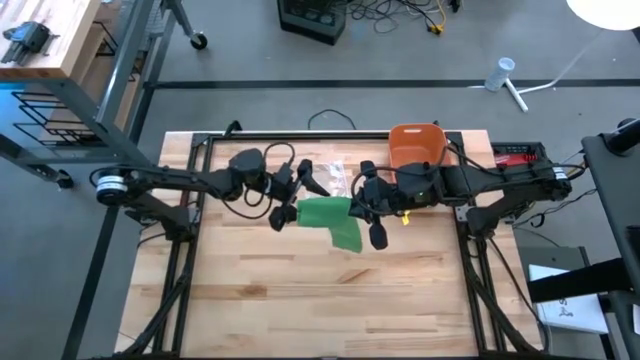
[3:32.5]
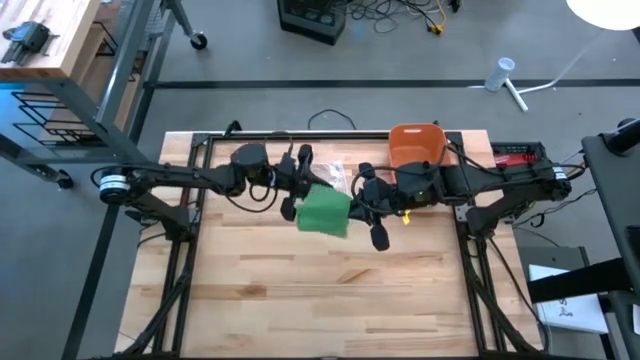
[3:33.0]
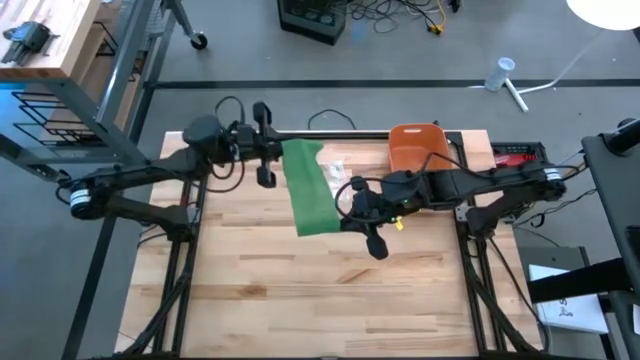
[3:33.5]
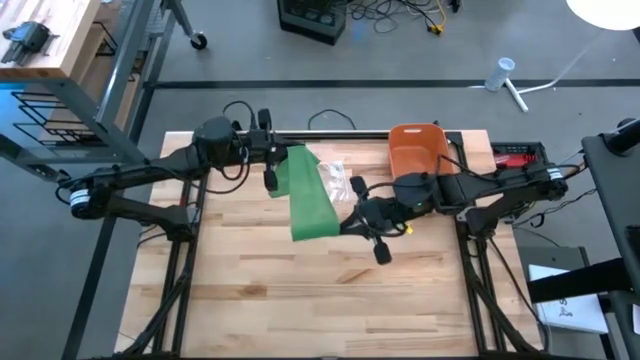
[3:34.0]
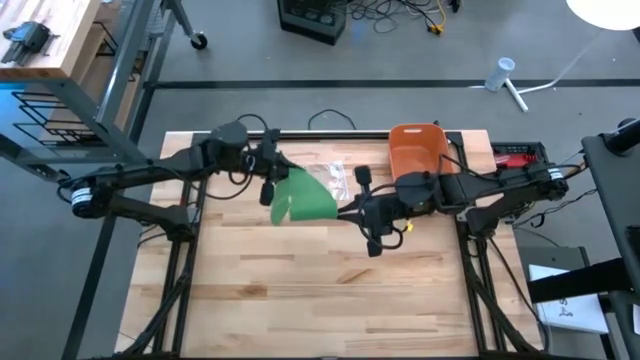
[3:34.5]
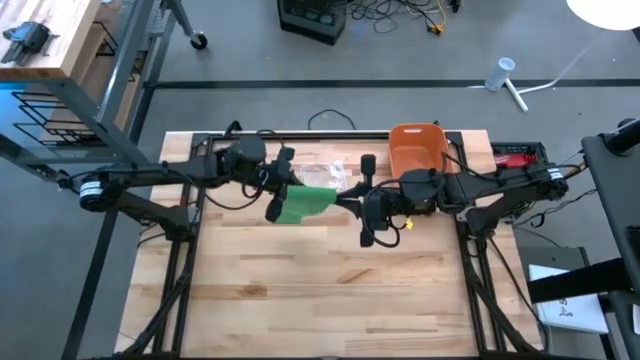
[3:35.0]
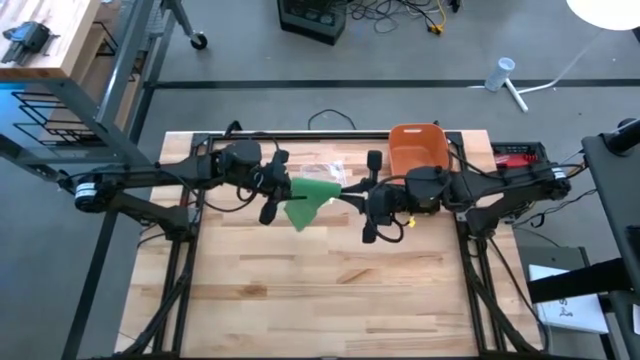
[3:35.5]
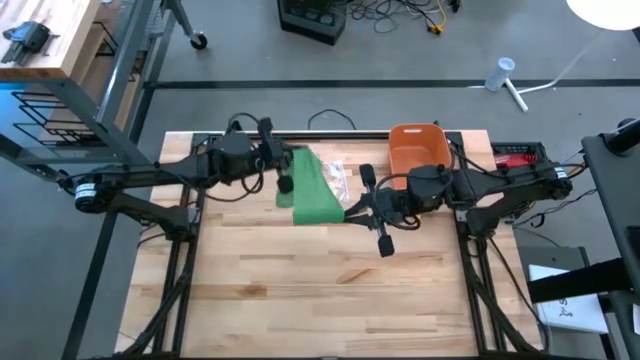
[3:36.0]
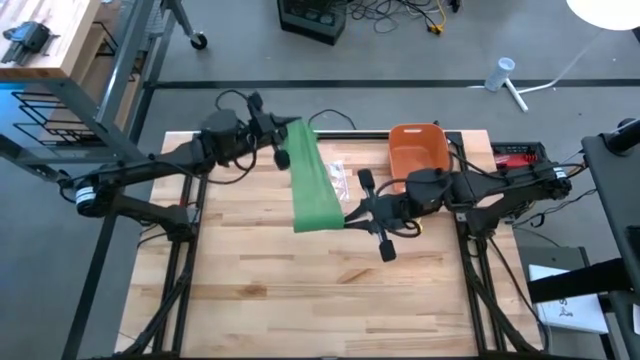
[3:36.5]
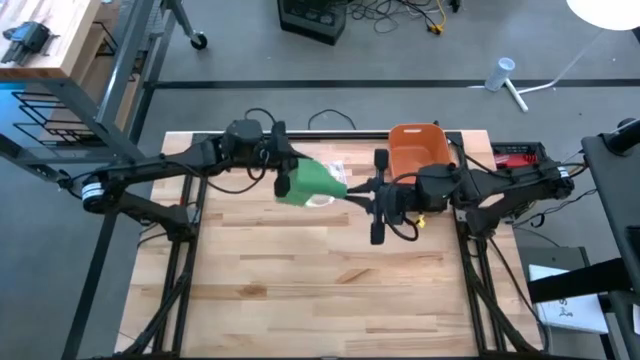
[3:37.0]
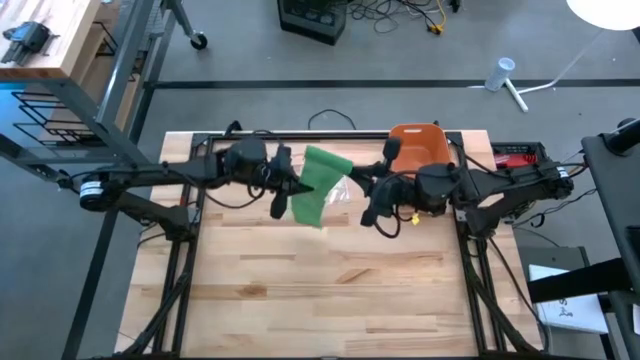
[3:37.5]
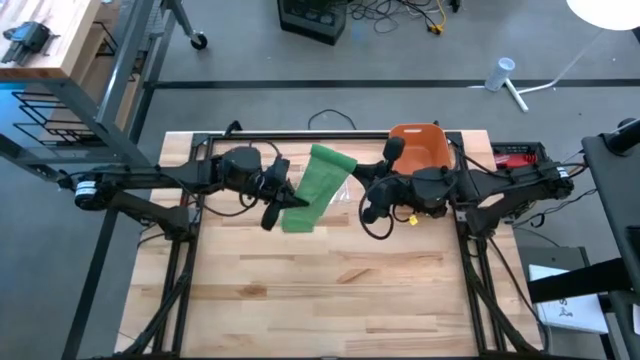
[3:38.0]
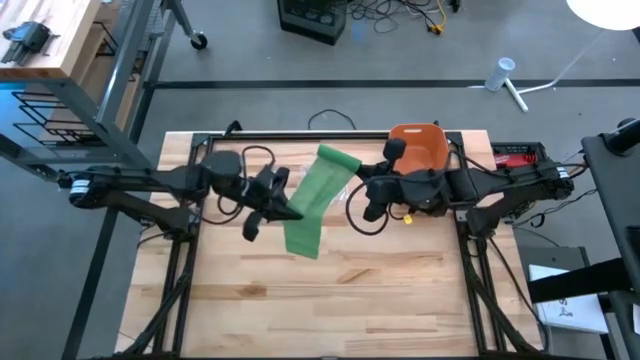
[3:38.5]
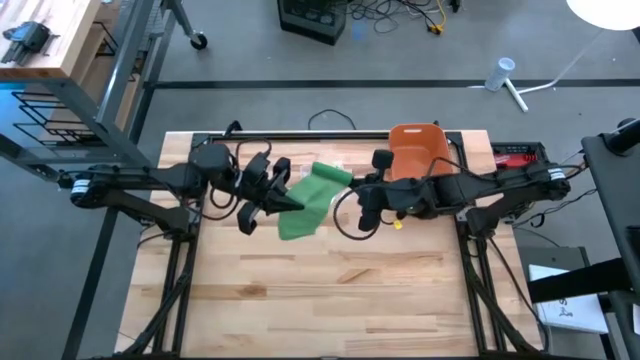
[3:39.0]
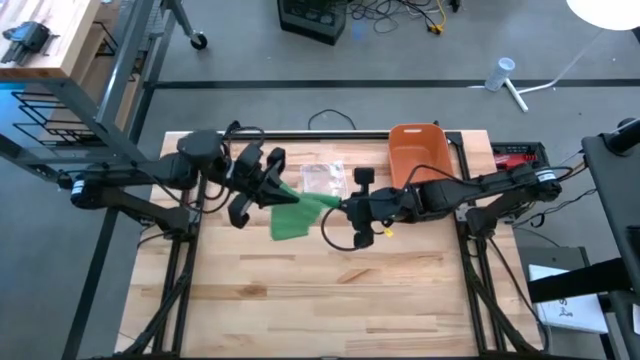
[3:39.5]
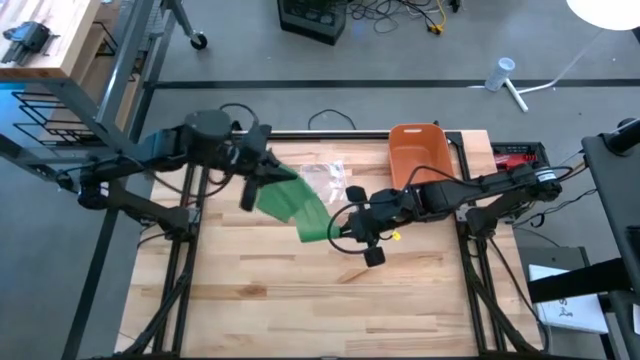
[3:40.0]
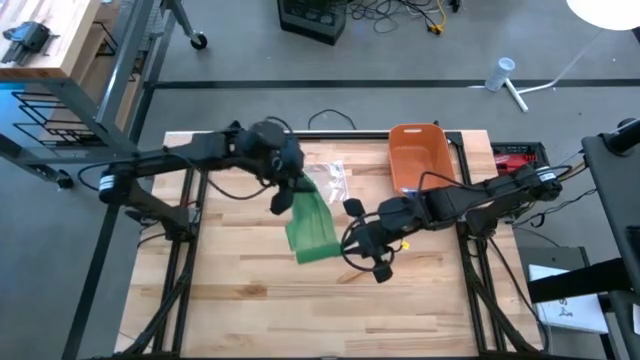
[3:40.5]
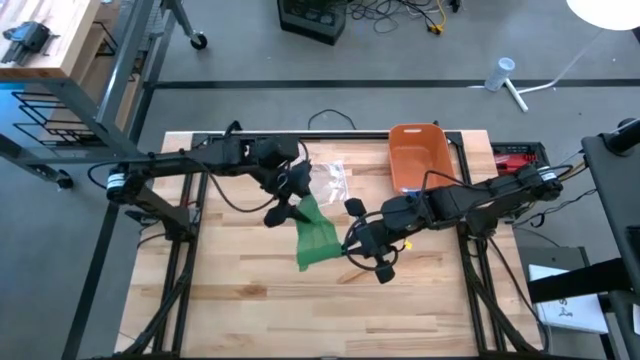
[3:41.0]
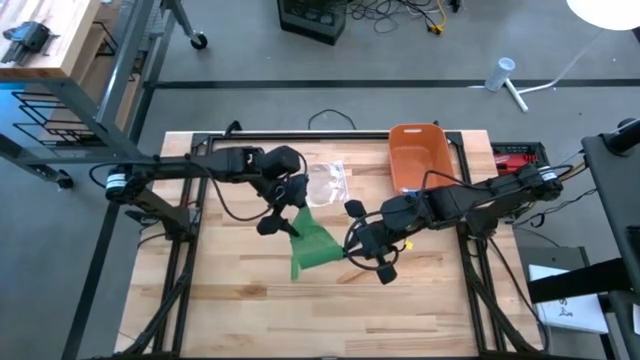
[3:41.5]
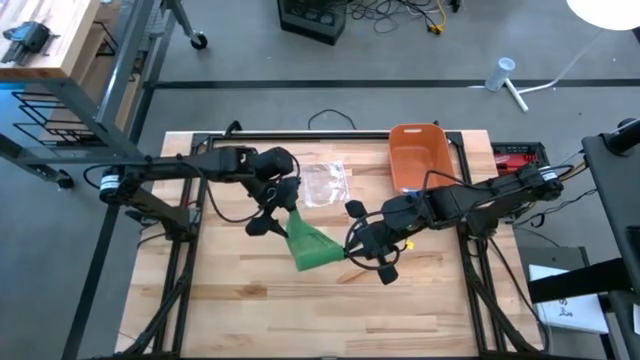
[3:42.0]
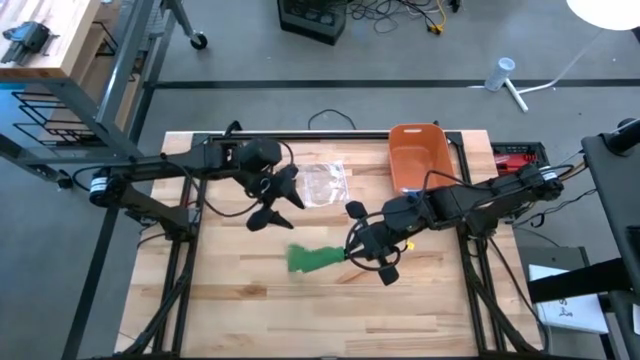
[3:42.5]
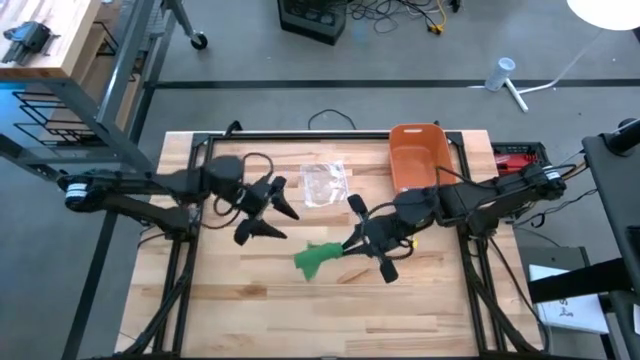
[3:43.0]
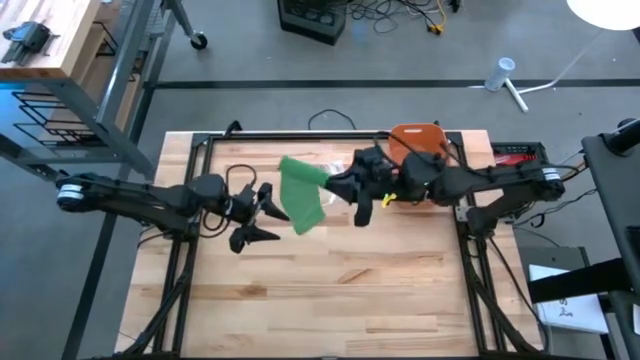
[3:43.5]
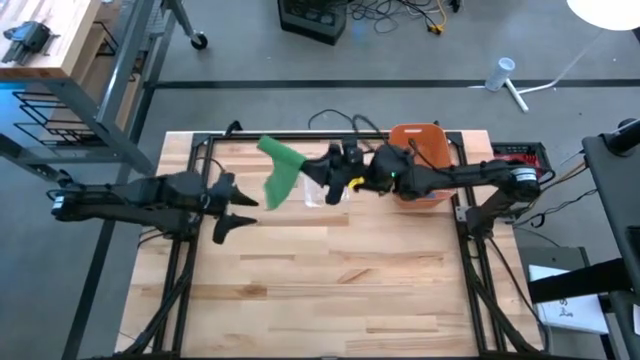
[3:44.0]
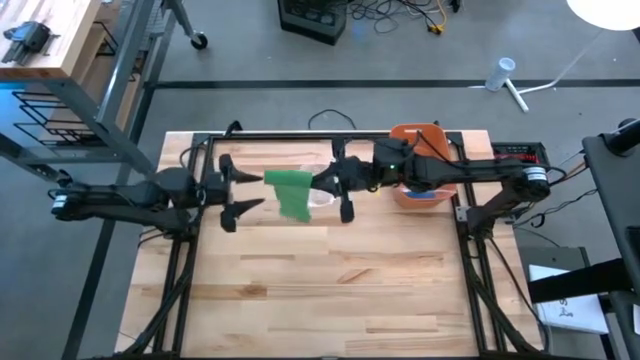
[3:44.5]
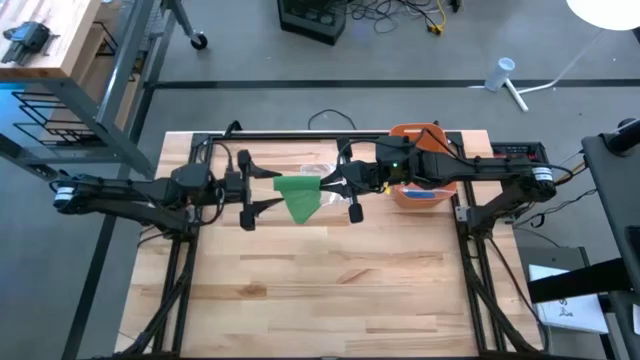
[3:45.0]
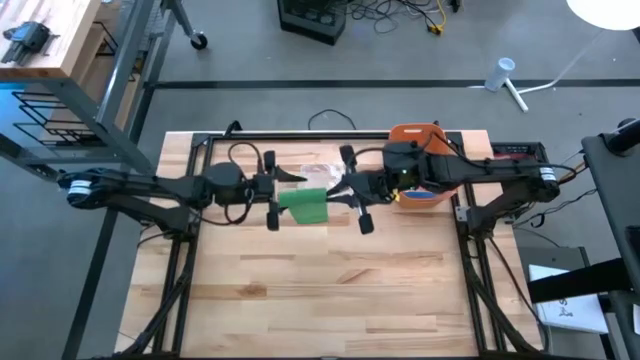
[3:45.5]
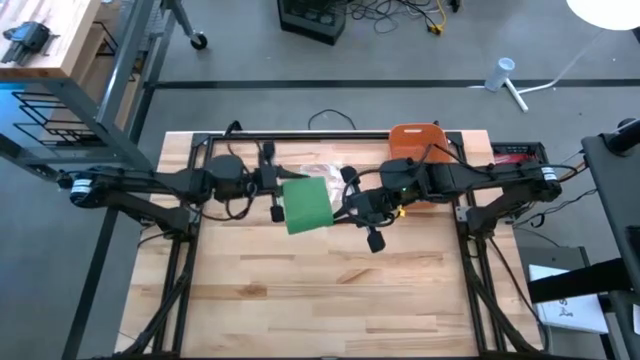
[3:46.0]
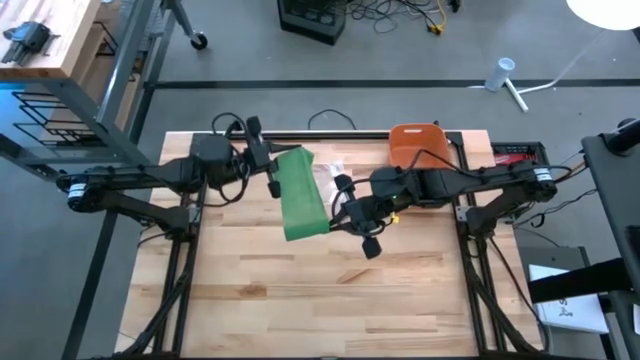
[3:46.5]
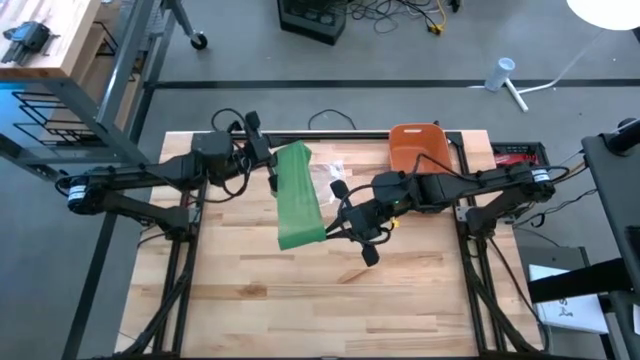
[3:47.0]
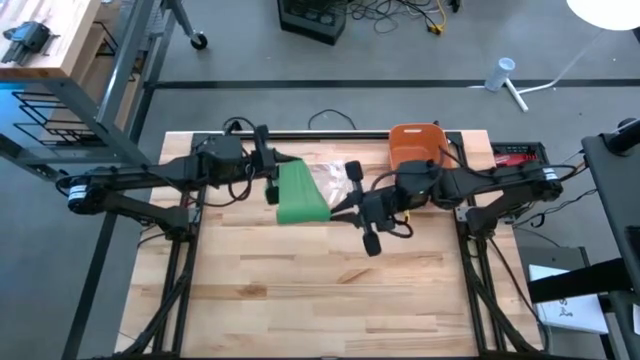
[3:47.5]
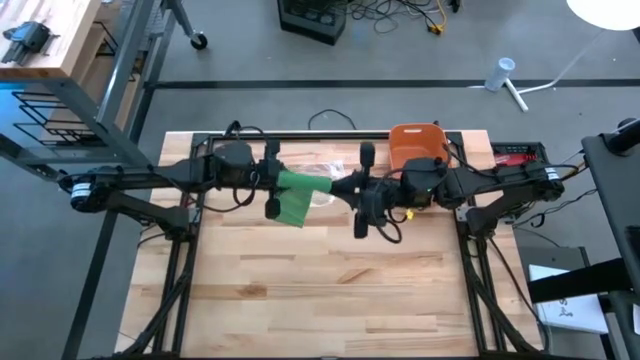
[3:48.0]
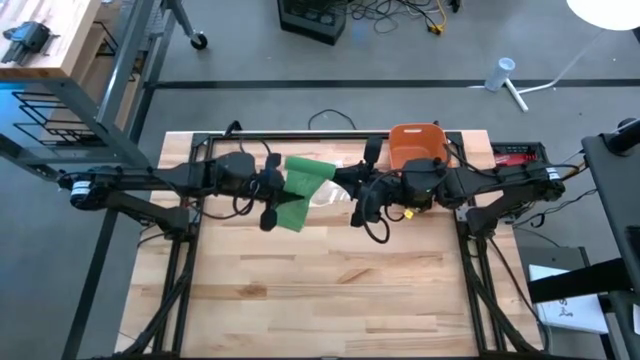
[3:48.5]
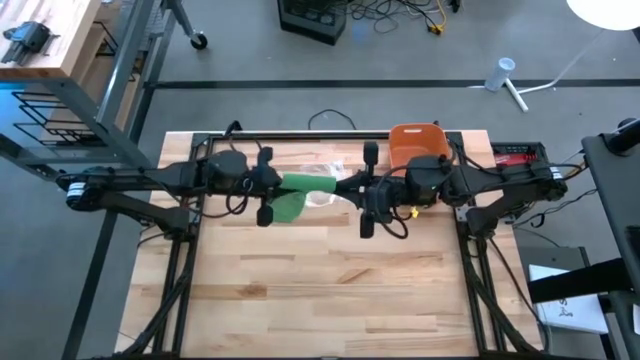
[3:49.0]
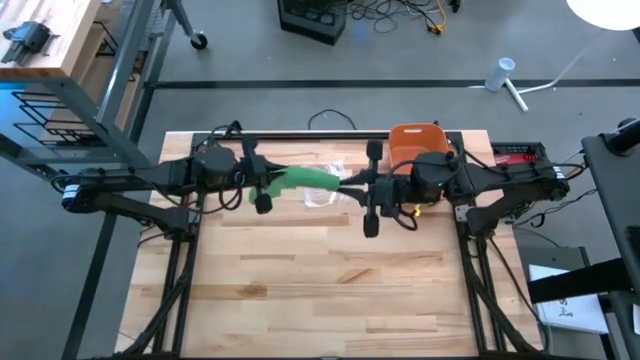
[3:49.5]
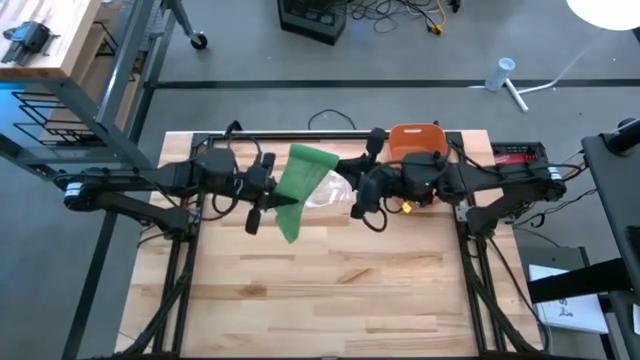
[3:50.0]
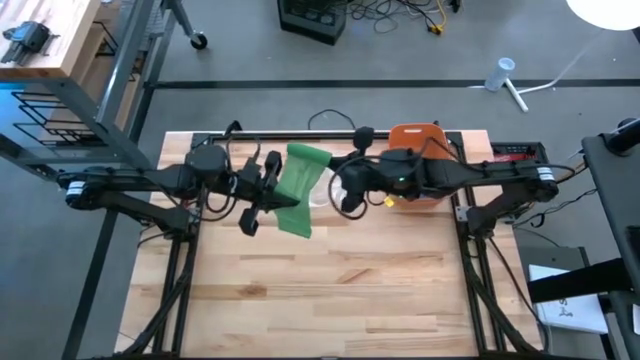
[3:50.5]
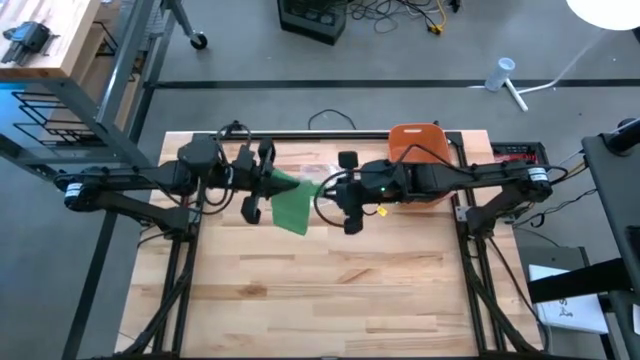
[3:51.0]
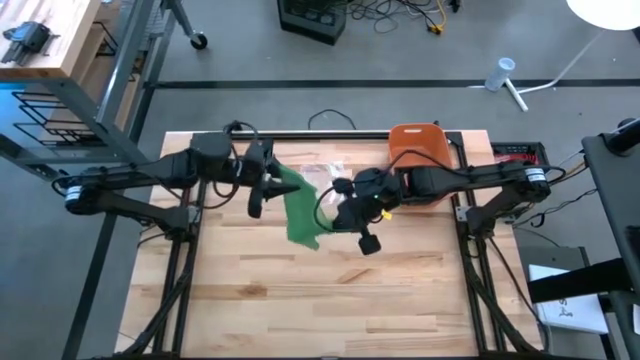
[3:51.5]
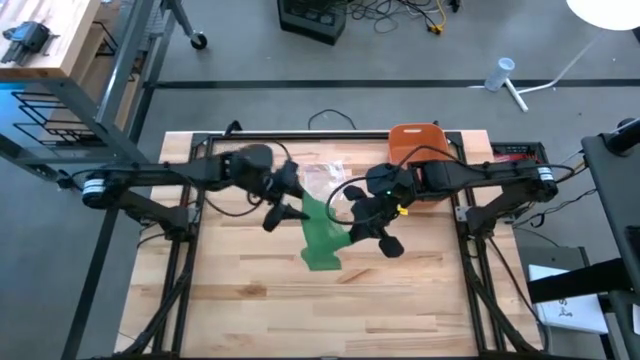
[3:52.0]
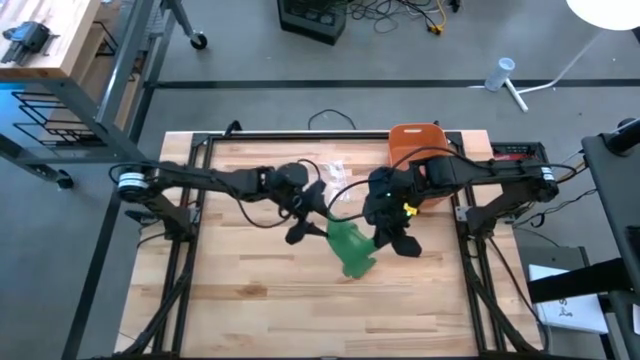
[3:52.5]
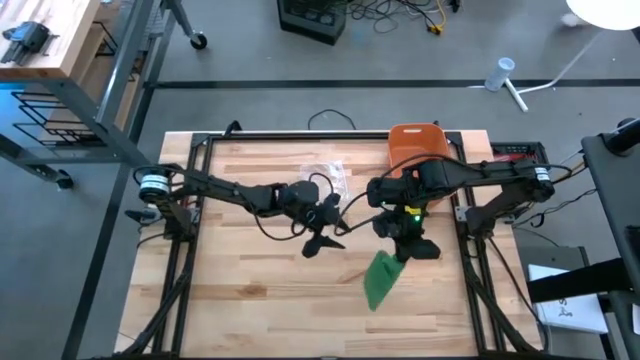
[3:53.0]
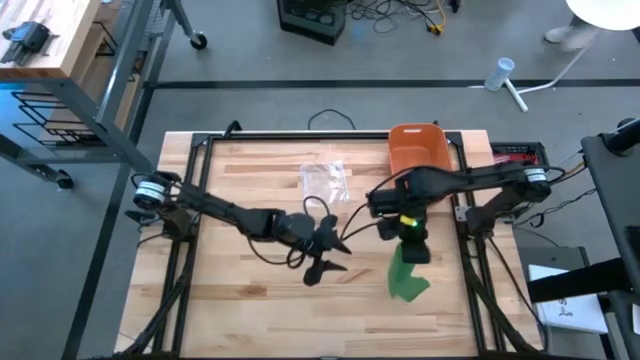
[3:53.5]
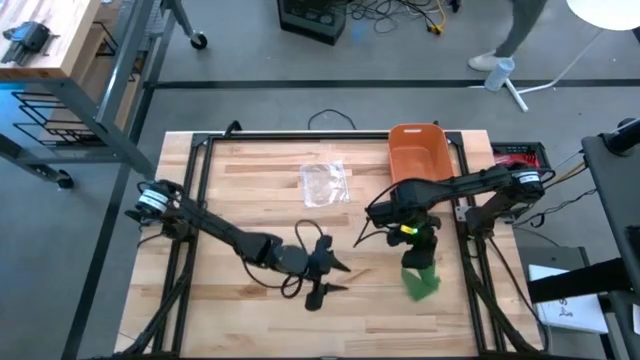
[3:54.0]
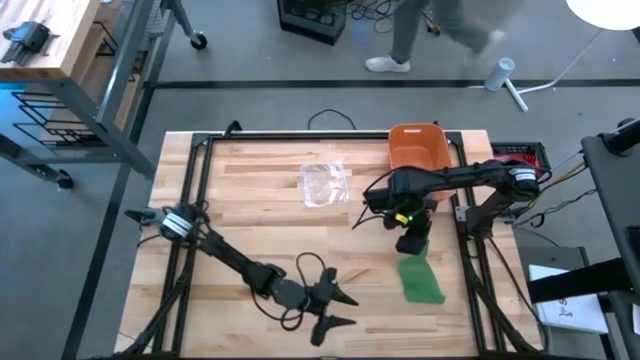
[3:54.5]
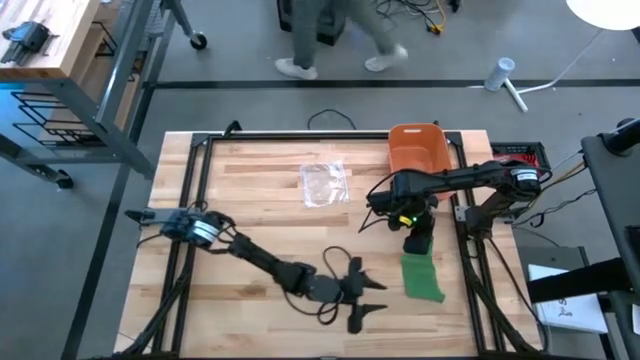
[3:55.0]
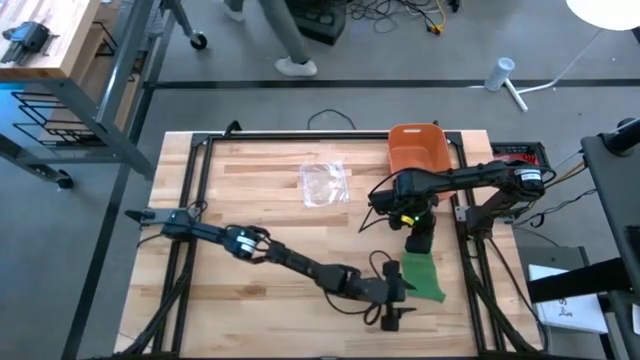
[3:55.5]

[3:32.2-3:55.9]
Task: Roll bandage
Roll the green bandage
